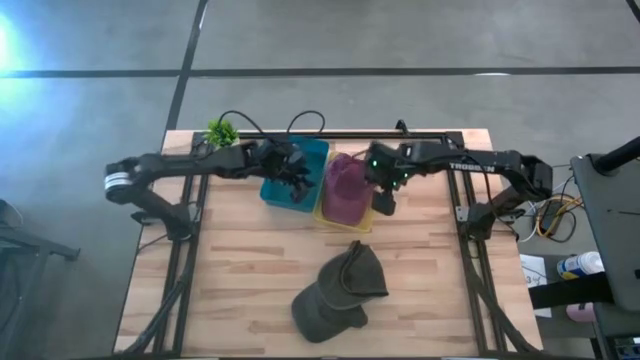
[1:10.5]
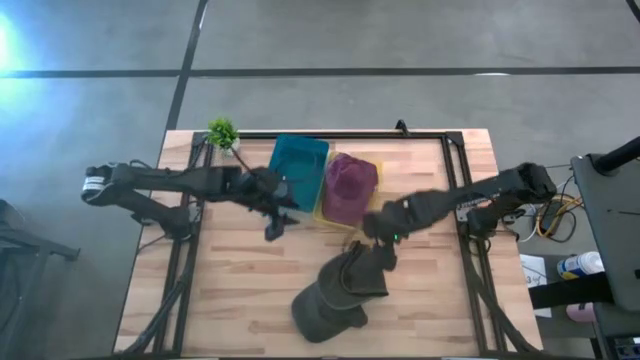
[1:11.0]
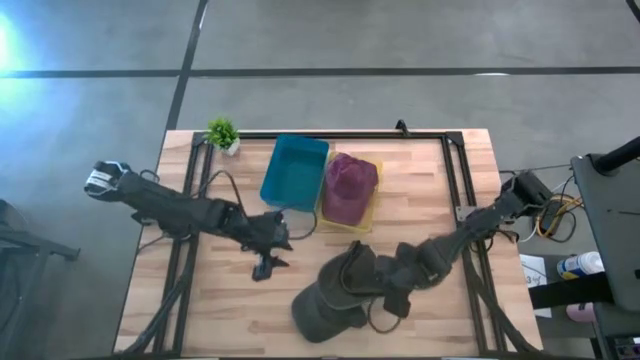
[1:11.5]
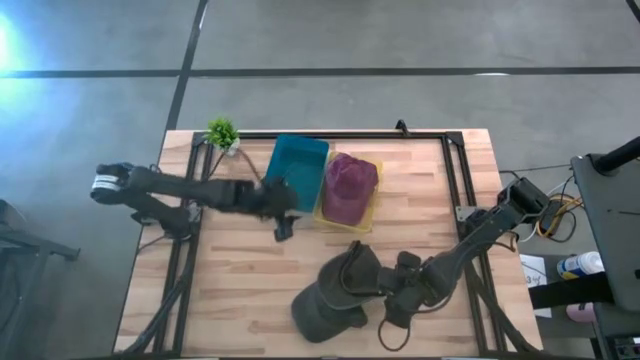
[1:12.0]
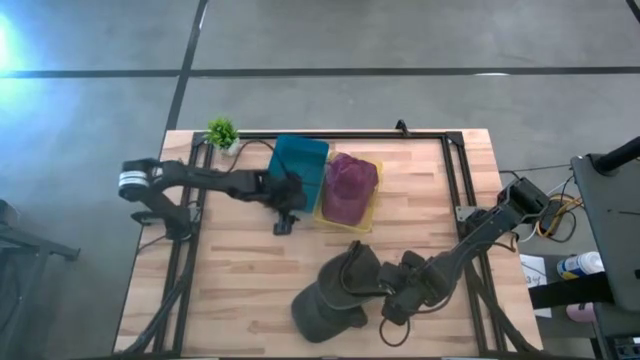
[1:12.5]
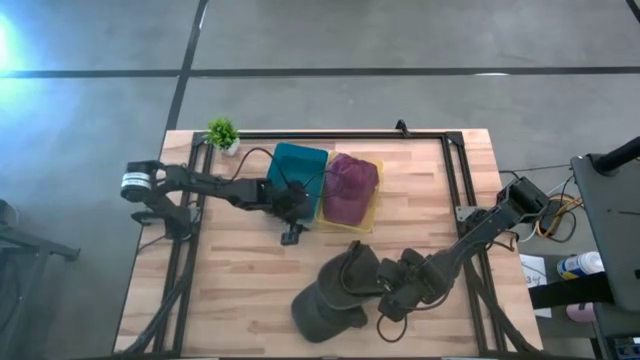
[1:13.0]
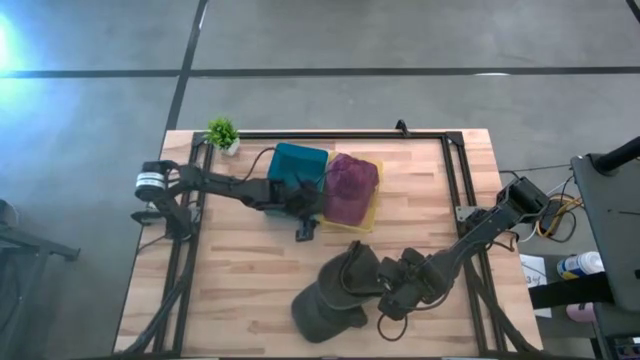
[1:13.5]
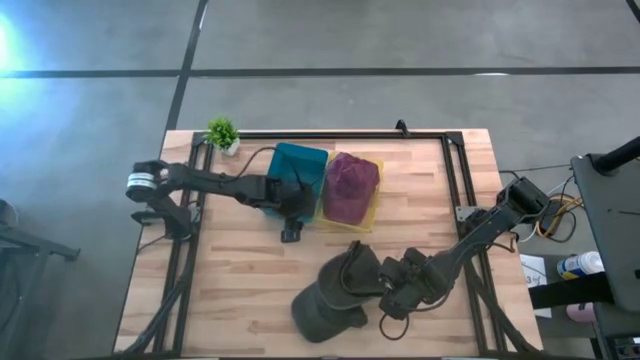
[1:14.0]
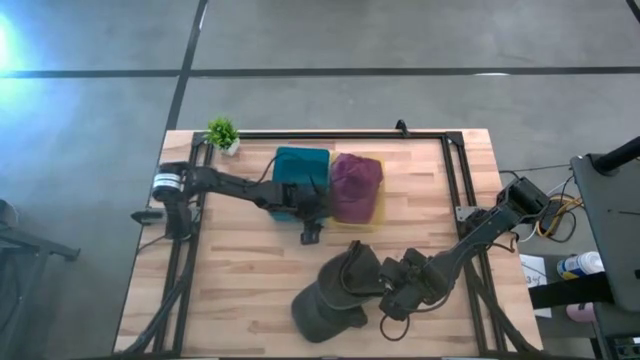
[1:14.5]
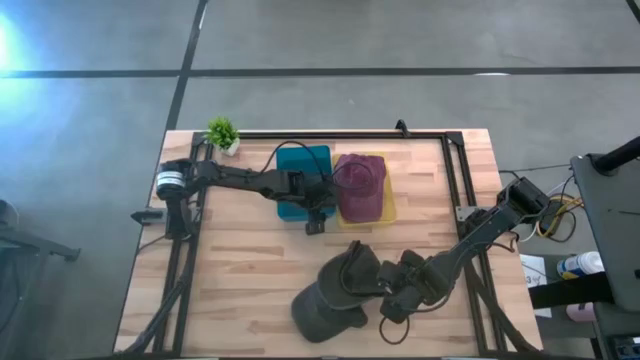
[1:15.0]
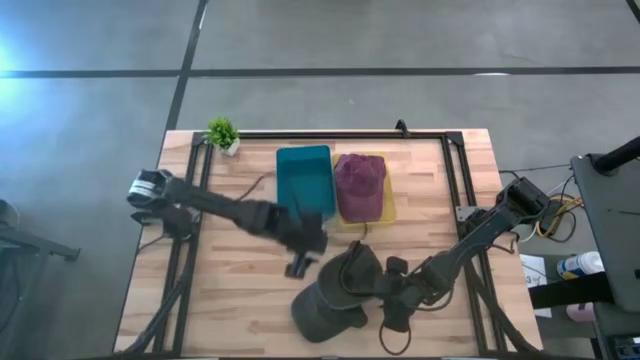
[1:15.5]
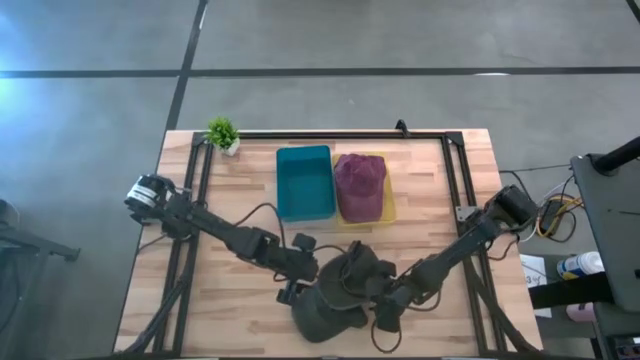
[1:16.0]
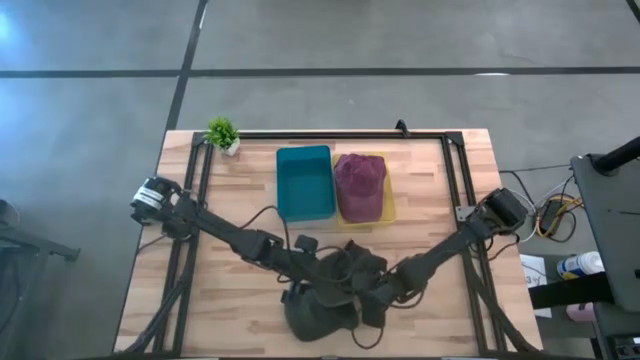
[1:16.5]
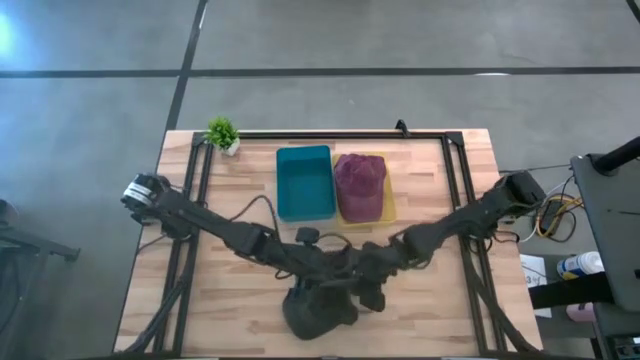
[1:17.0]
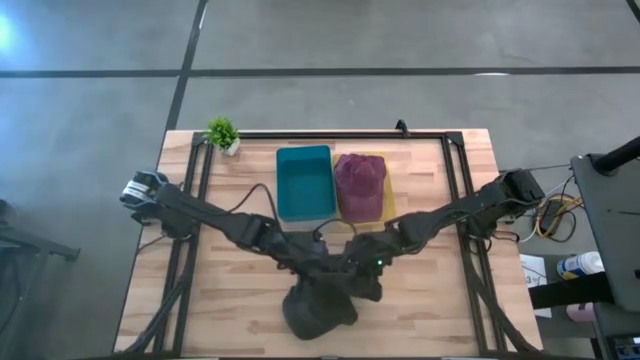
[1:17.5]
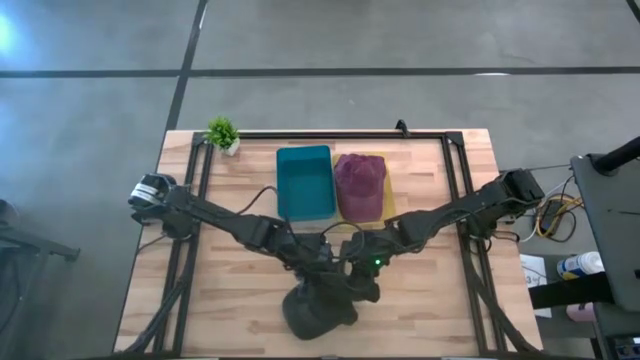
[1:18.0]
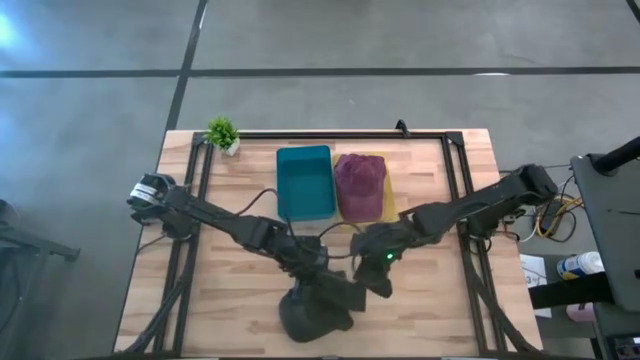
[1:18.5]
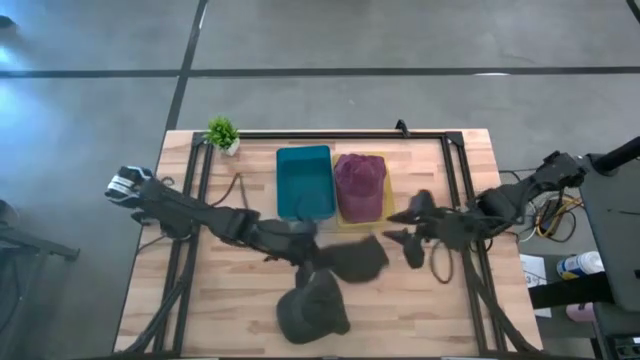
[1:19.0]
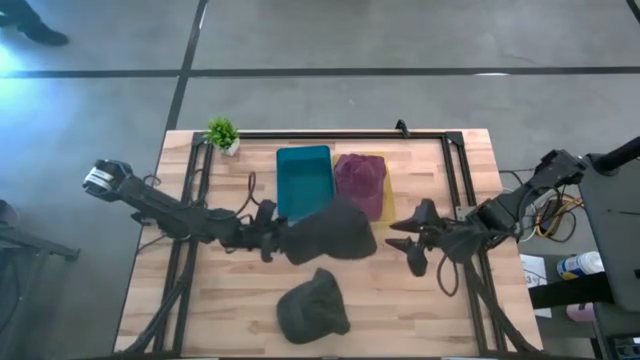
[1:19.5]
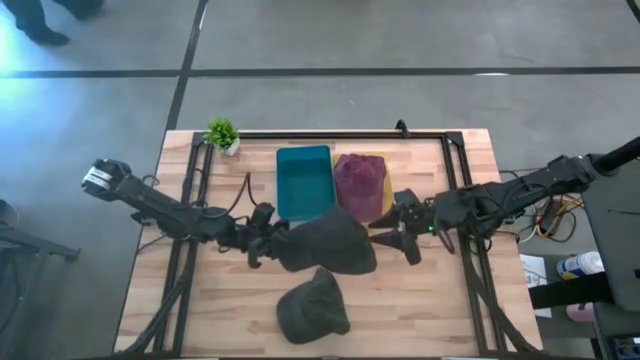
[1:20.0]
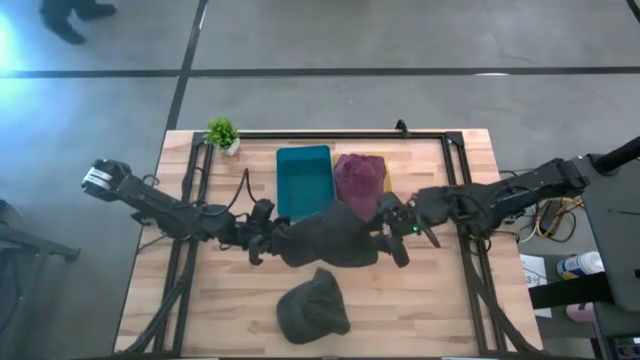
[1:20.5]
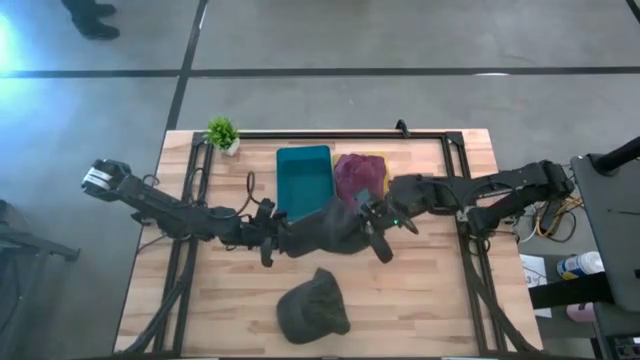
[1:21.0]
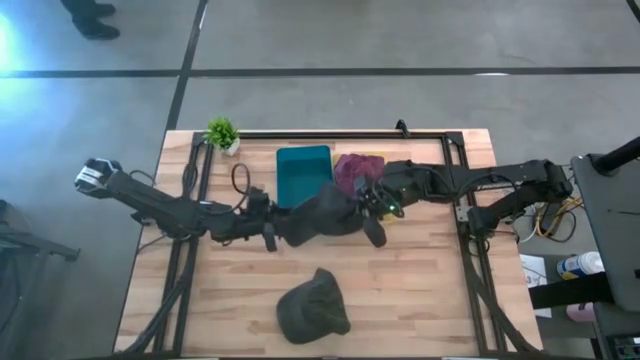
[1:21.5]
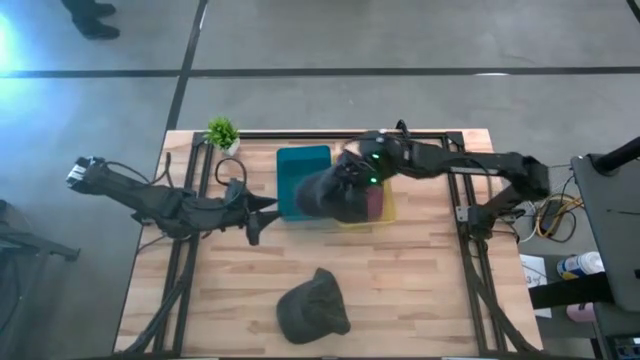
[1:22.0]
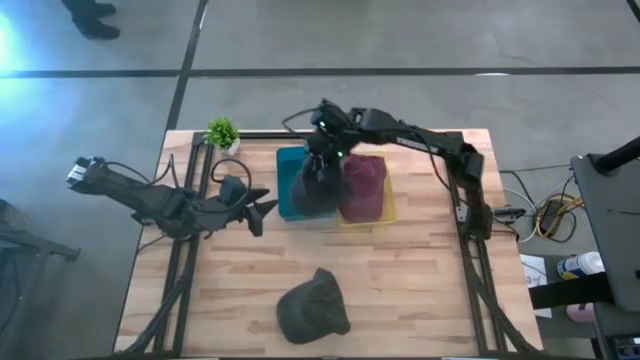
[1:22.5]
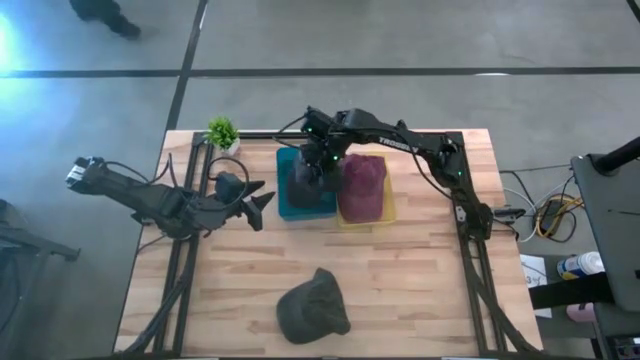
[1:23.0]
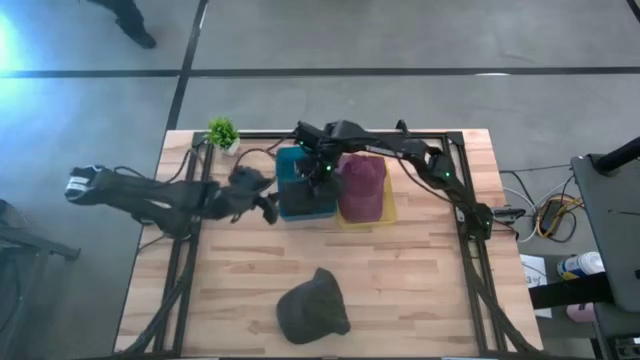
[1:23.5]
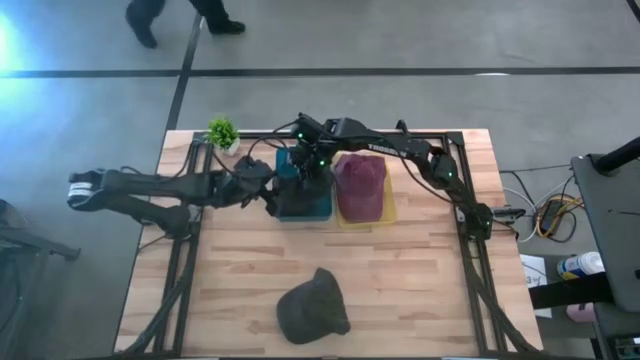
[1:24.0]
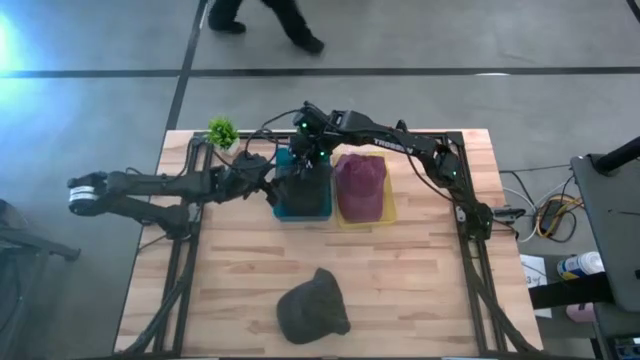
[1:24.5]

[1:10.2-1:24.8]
Task: Pick & Place hat
Put the top gray cap into the blue bin

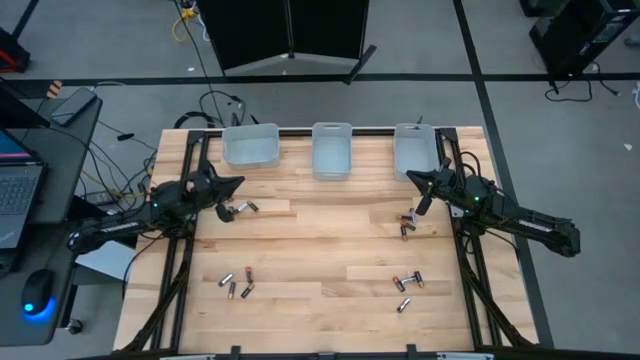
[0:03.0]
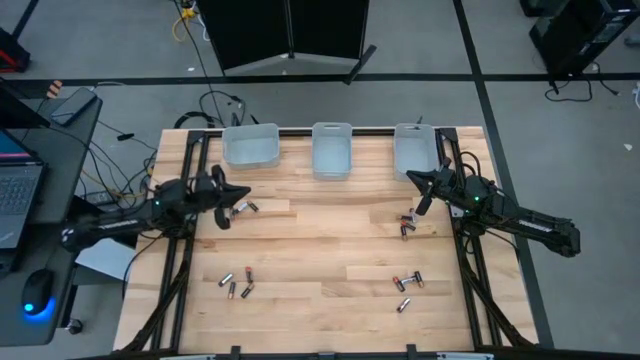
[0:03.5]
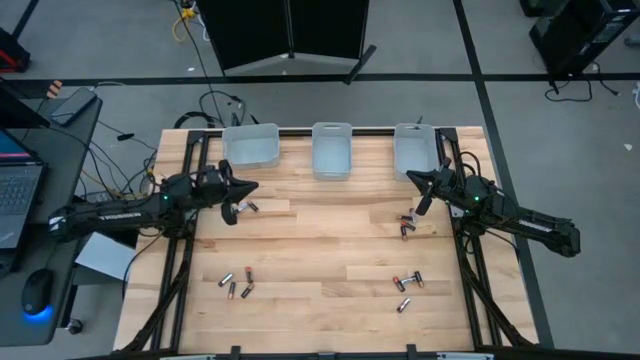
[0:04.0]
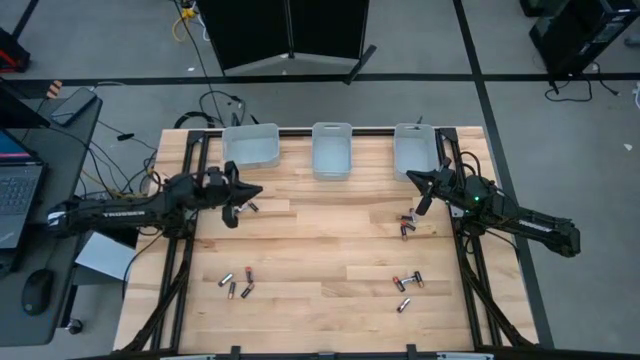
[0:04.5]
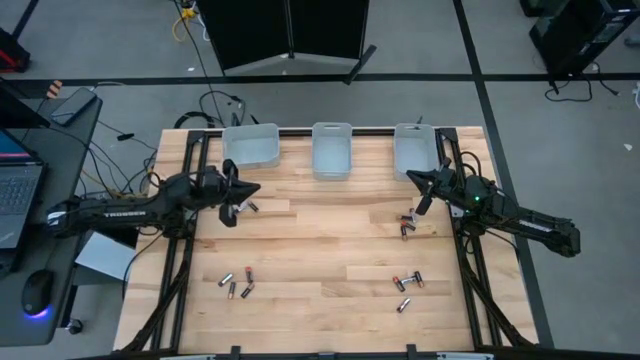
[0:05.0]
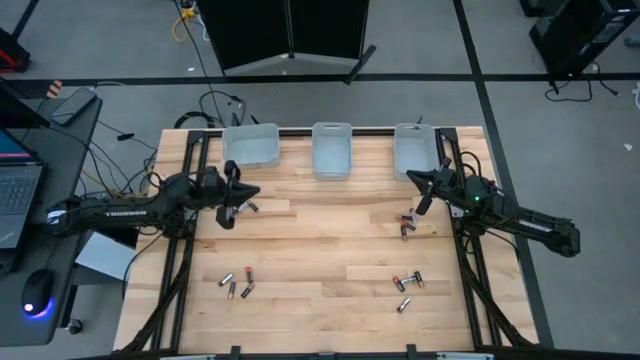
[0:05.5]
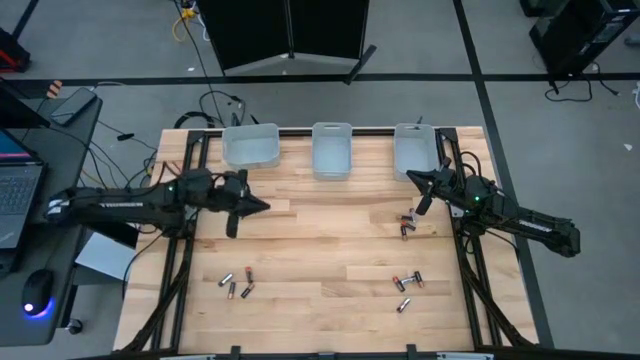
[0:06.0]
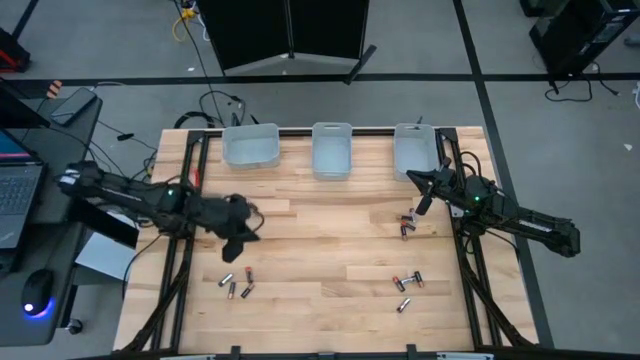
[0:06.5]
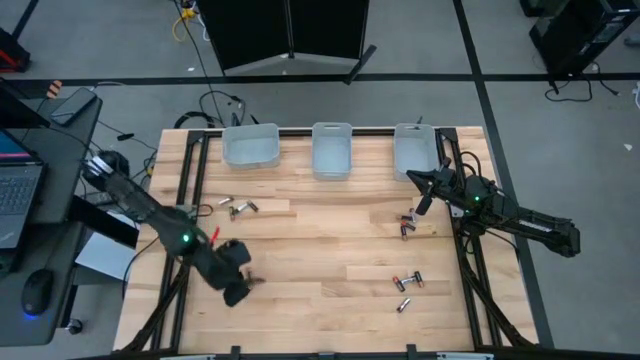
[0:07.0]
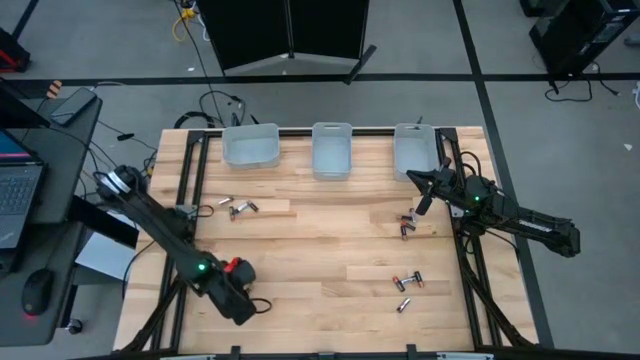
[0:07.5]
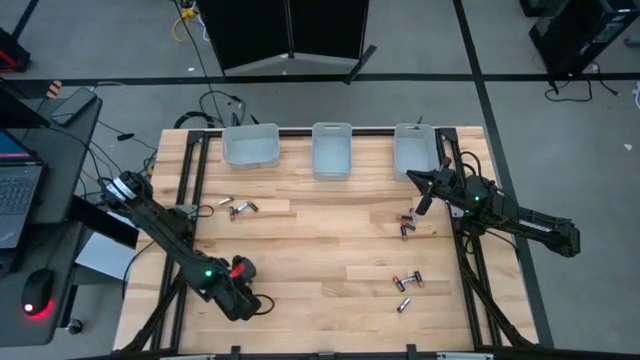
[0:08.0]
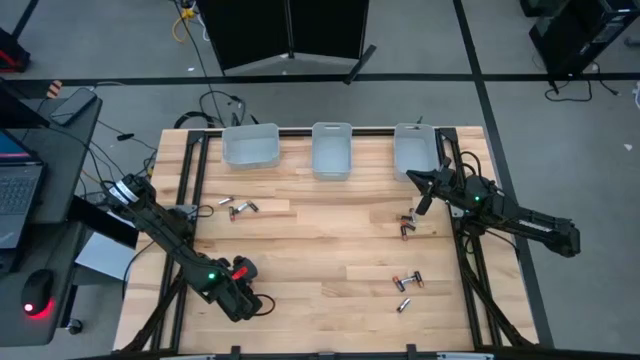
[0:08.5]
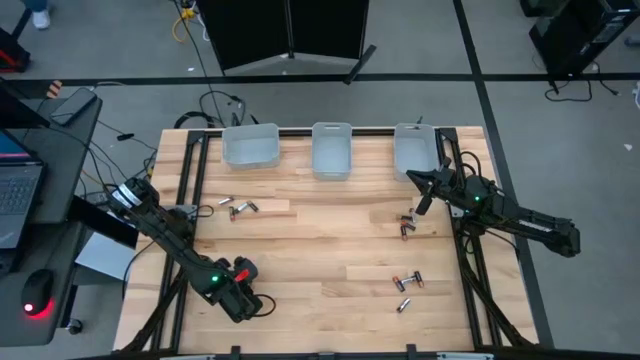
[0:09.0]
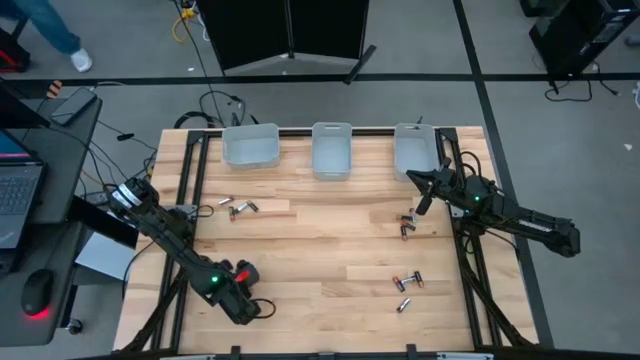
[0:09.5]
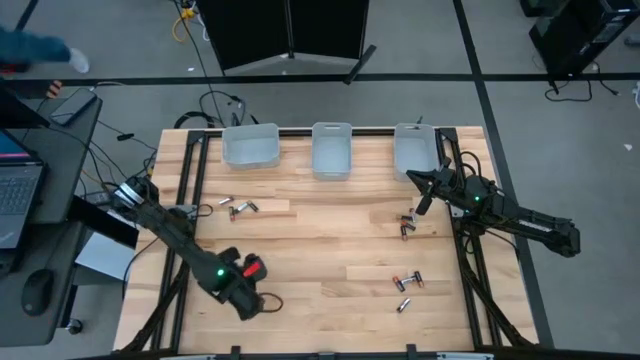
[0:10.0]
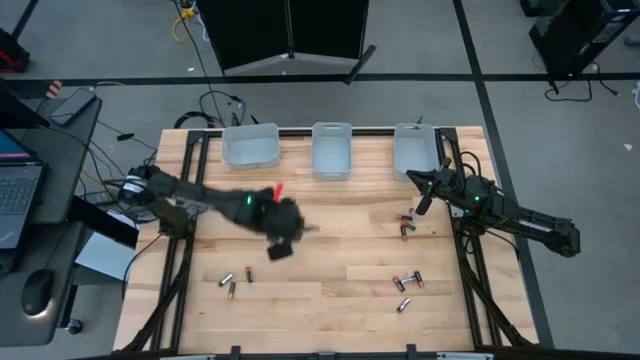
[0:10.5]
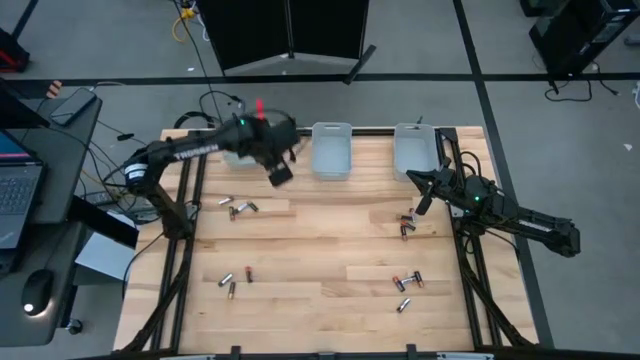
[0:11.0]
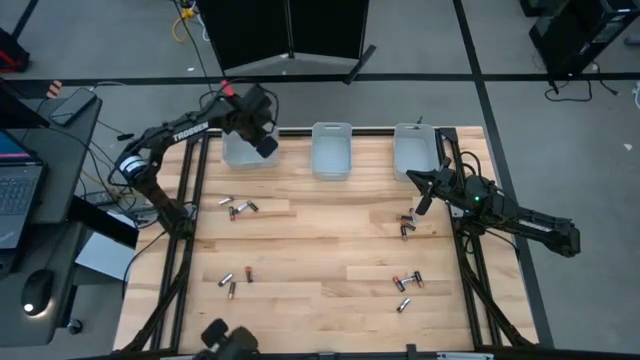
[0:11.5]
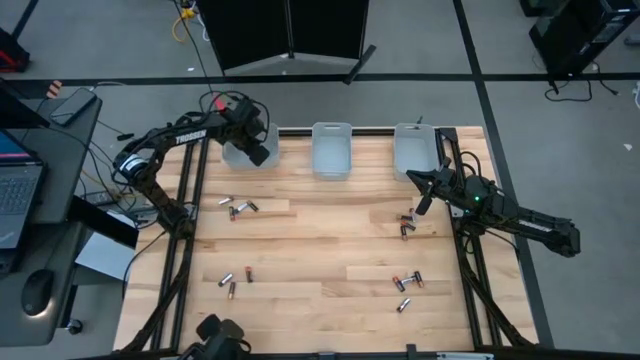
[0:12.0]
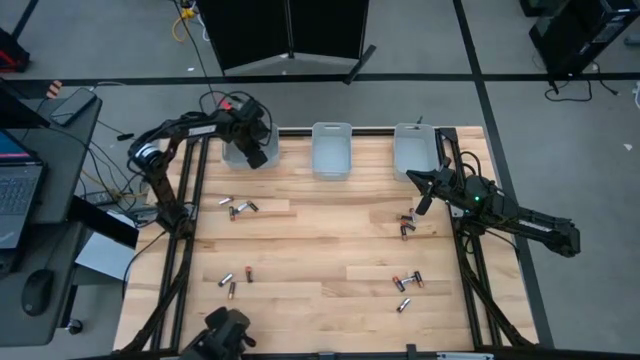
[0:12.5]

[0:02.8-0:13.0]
Task: Sort batteries
Put the black brown battery into the left bin
